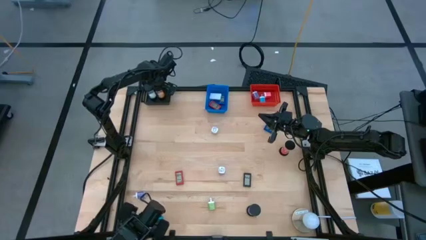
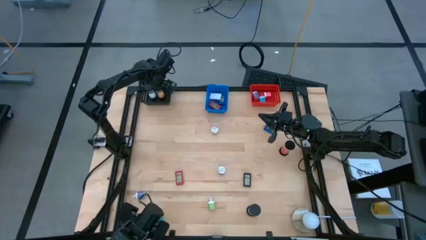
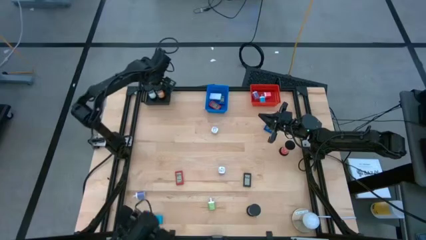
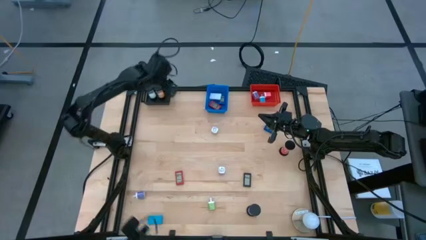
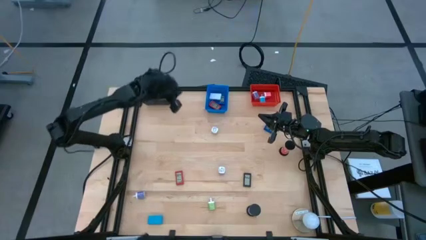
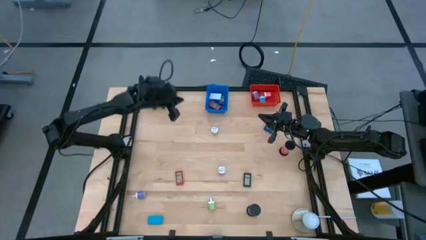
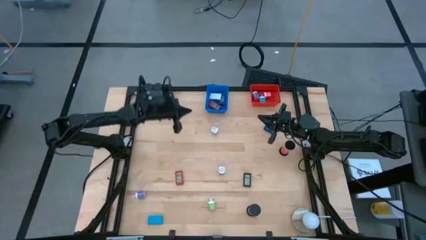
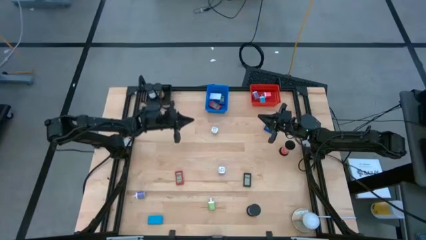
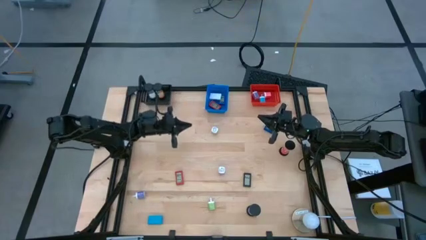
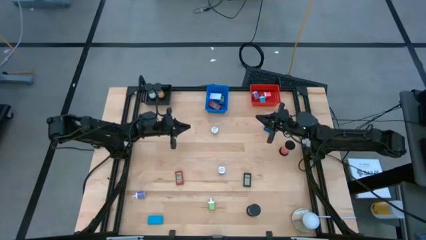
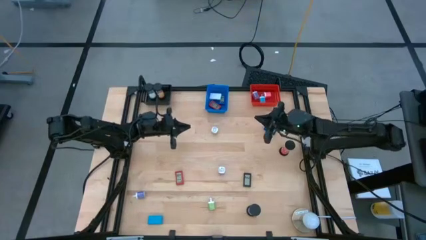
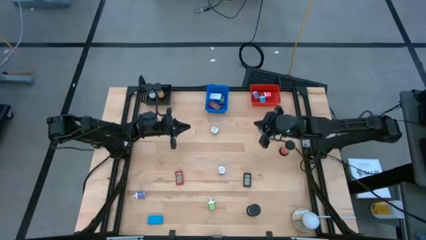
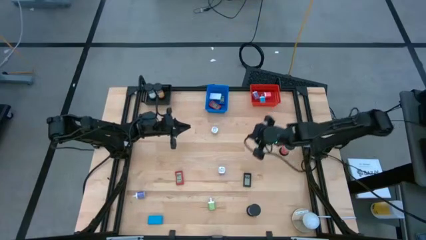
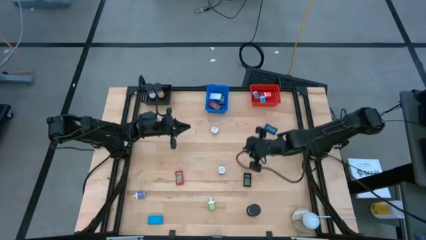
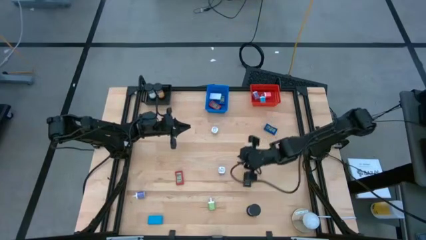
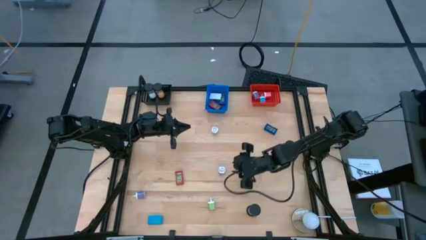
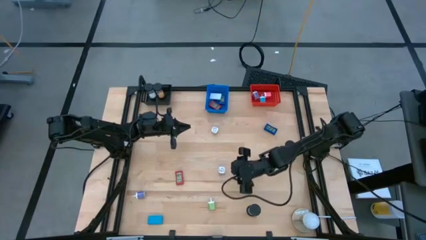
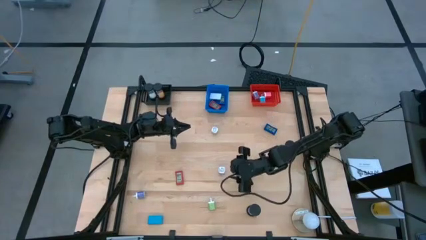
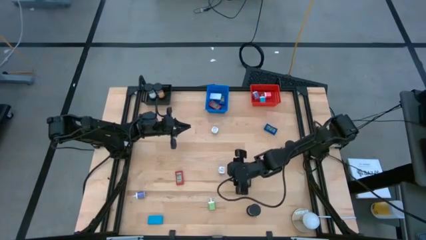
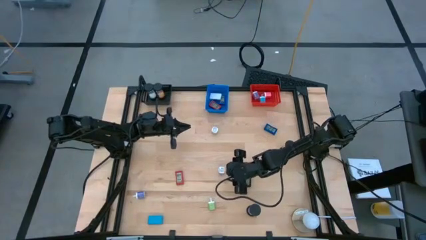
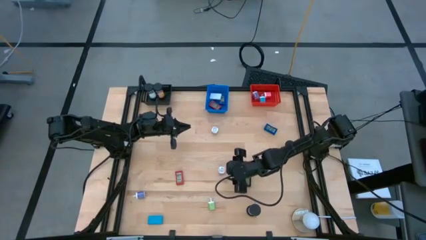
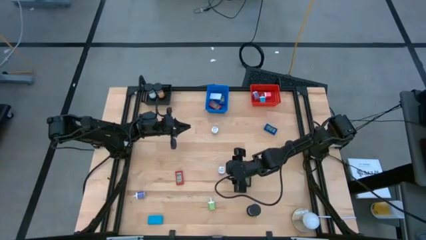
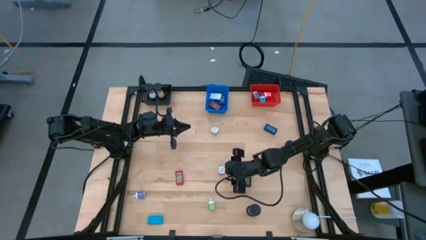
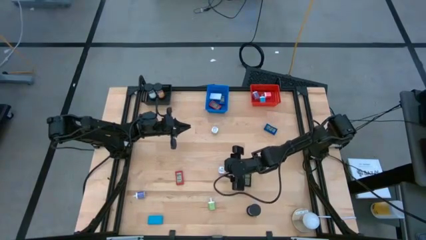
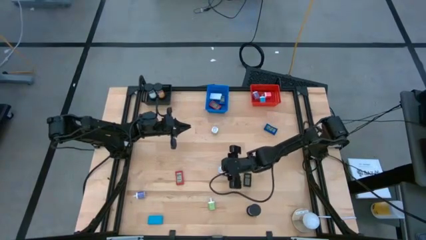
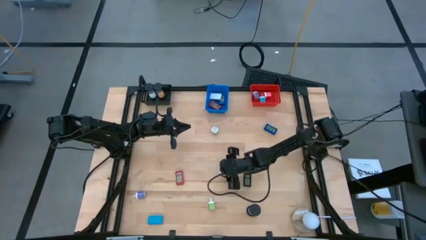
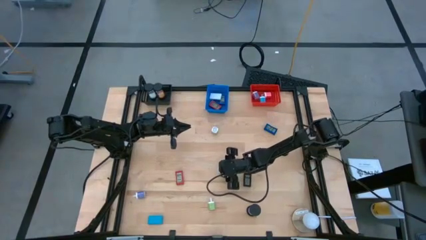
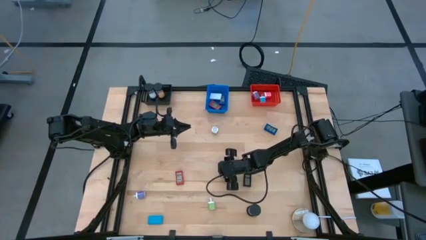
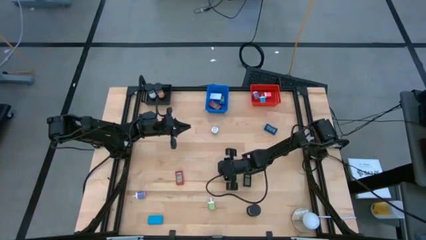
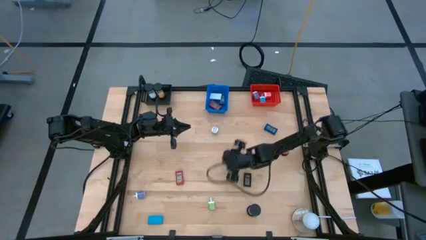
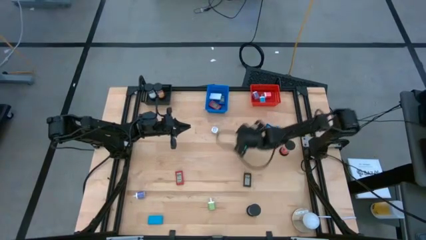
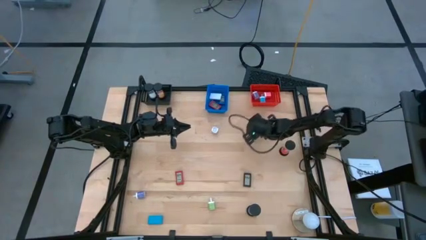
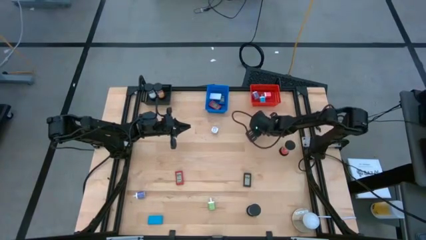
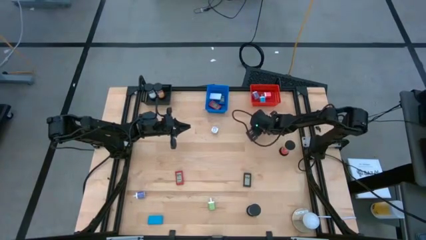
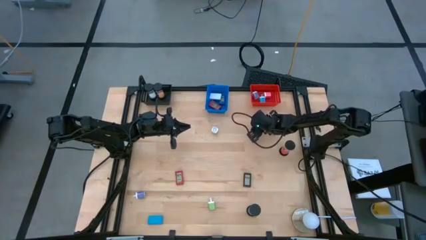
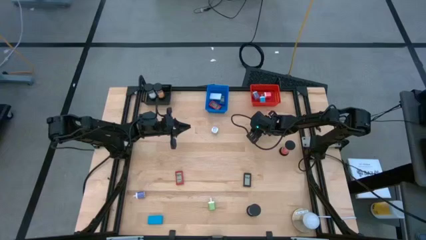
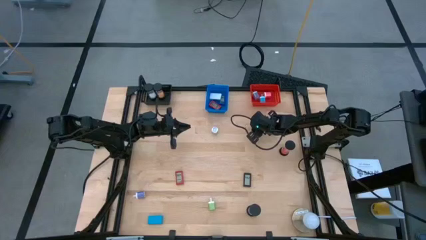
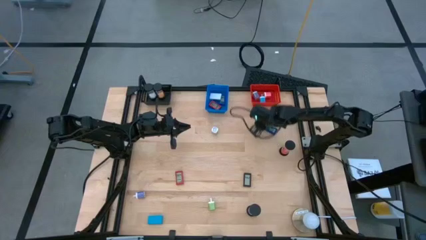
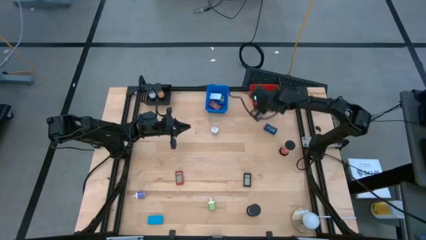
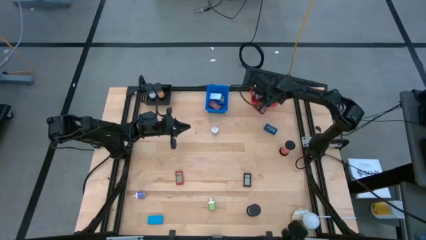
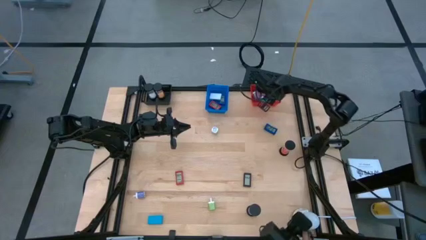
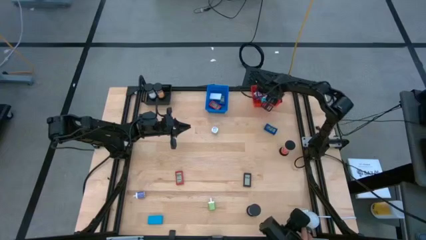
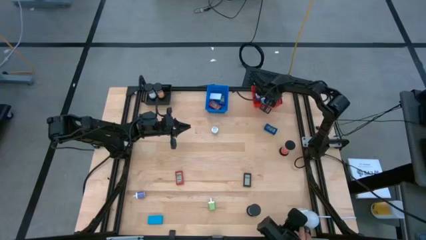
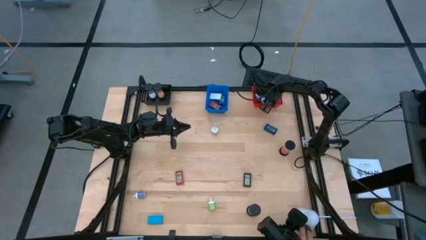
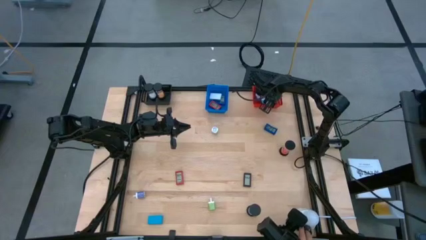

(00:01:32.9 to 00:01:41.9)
Task: Pick & Place Office items
Put the right purple charger adapter into the red basket

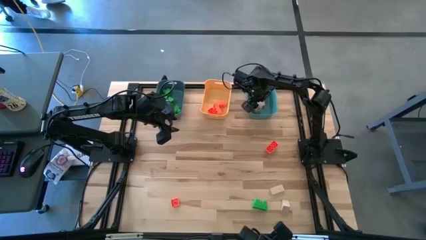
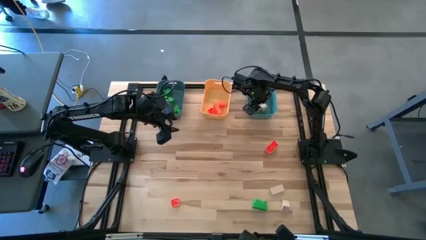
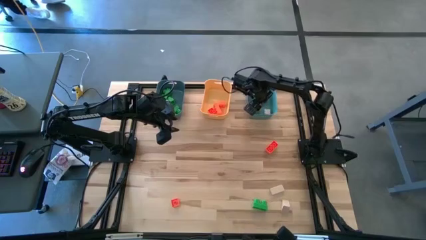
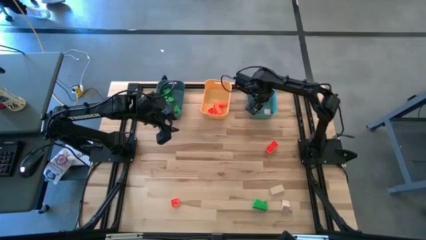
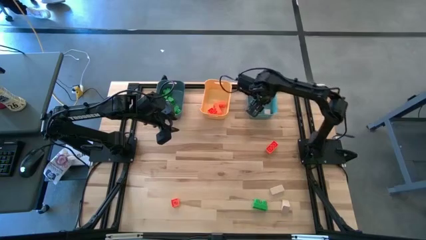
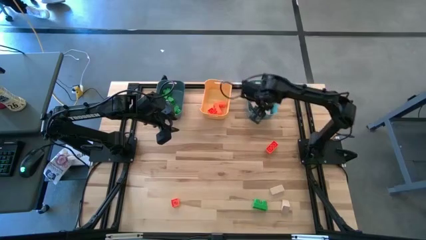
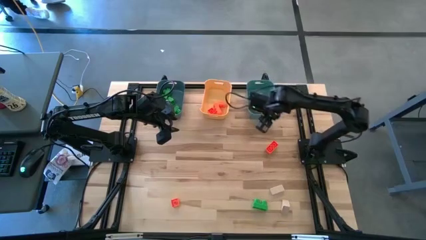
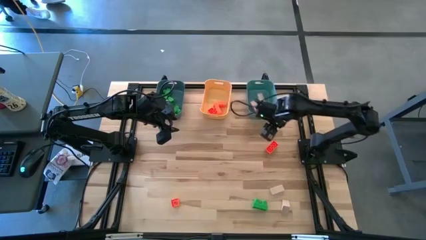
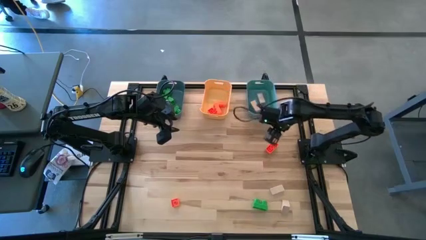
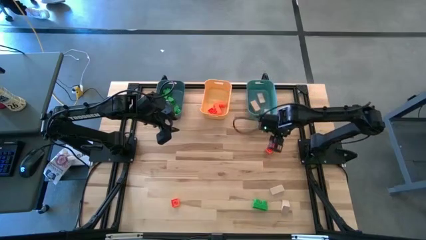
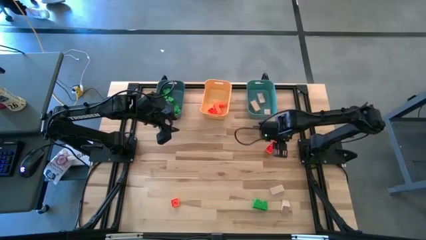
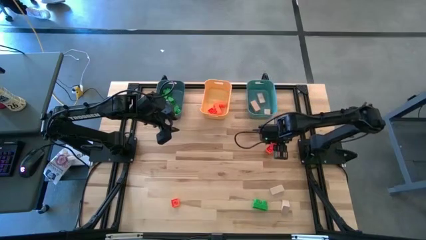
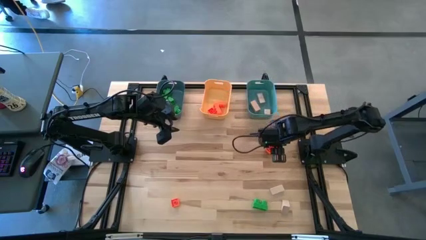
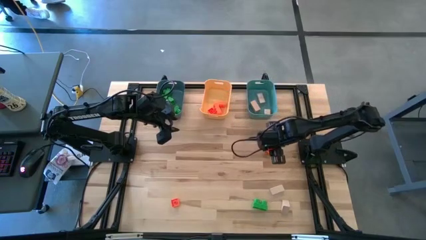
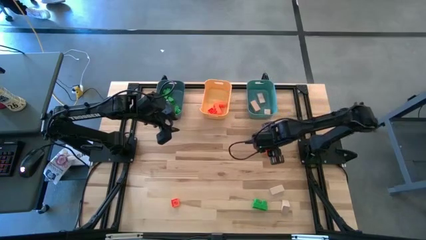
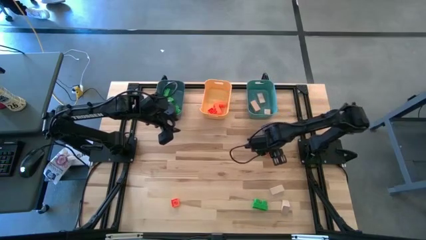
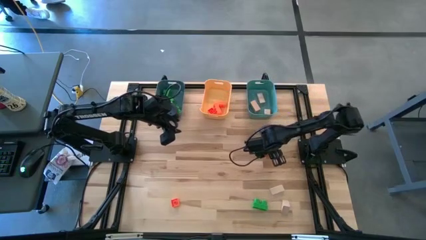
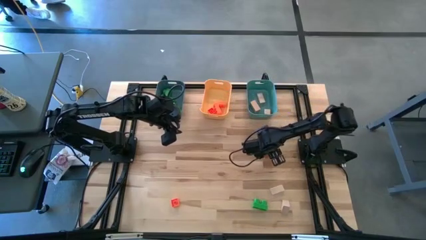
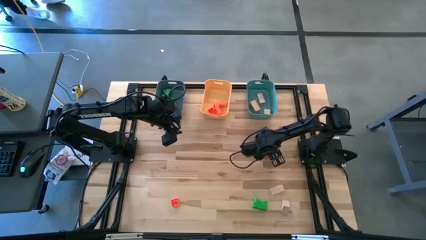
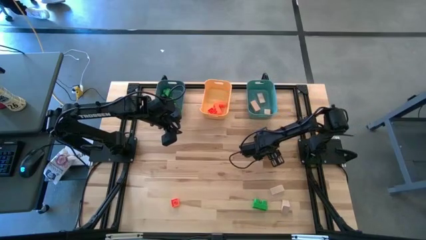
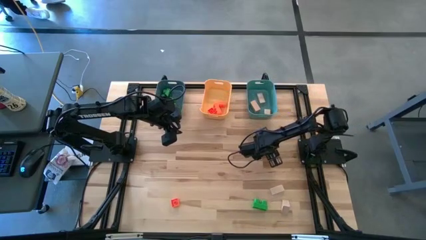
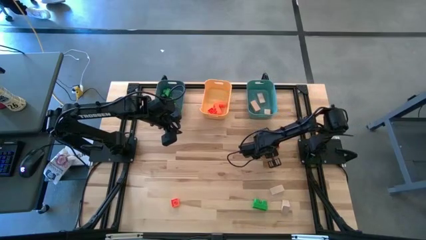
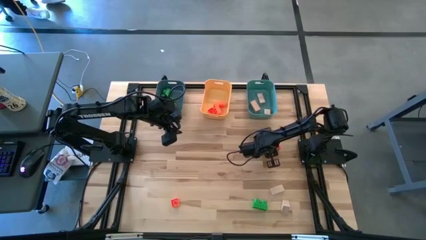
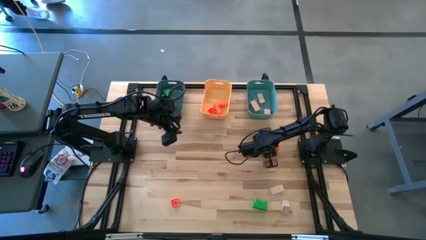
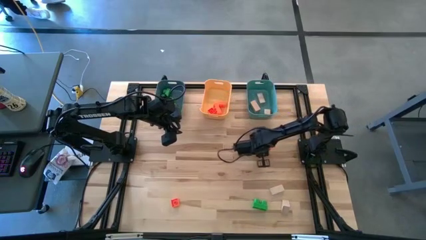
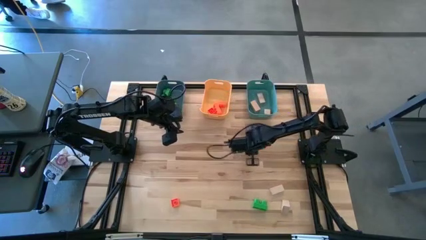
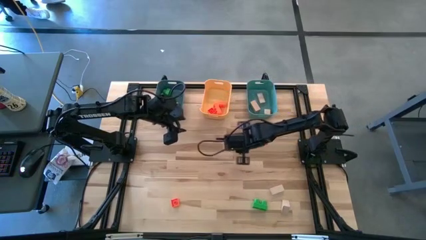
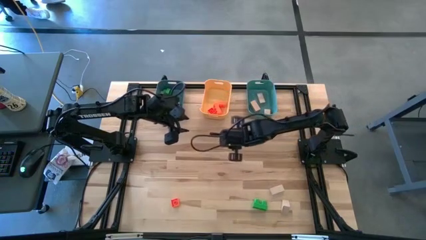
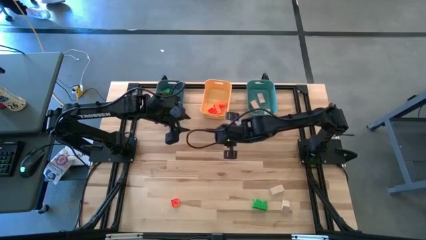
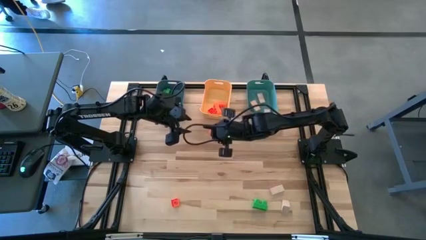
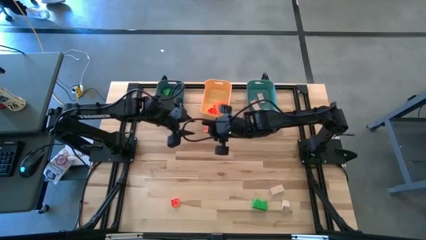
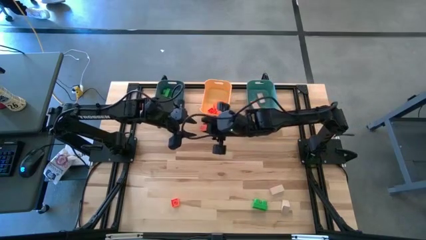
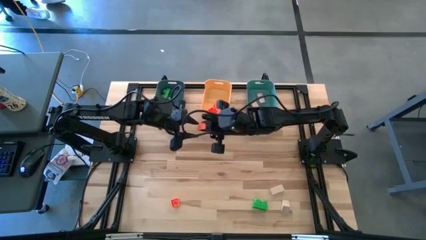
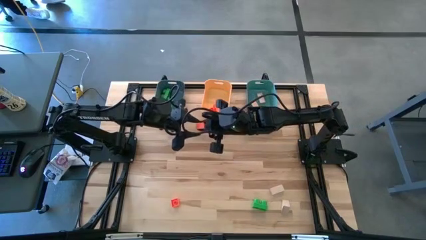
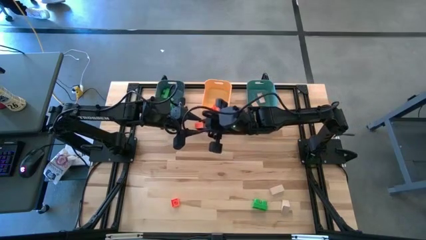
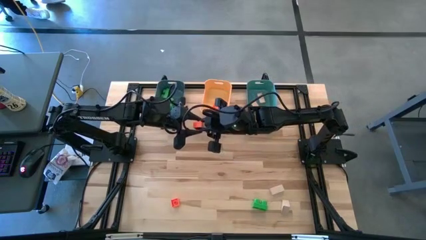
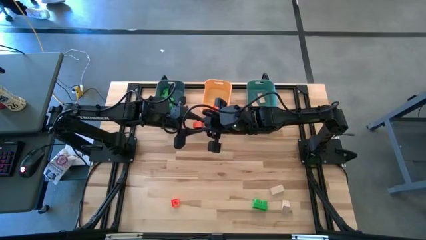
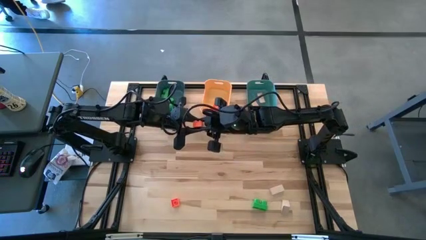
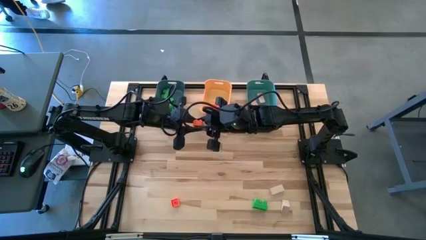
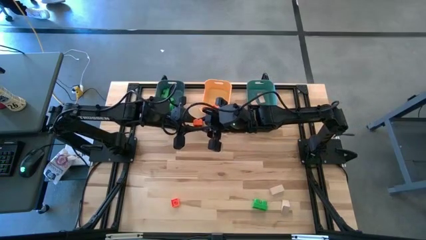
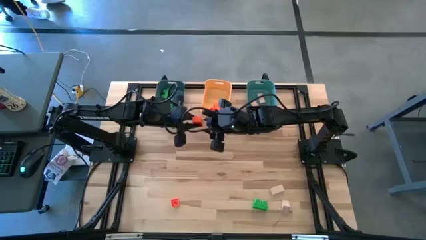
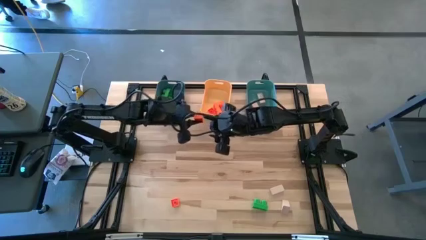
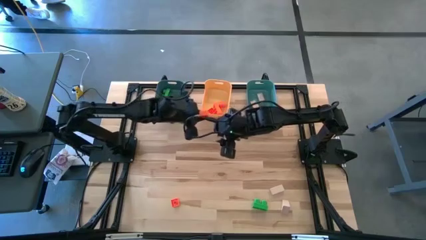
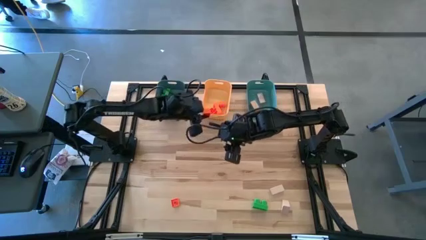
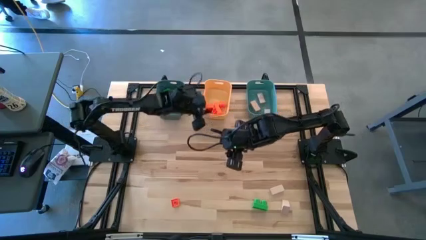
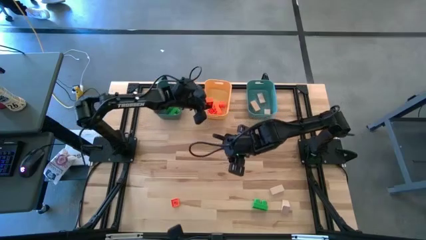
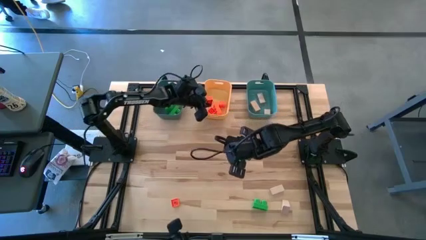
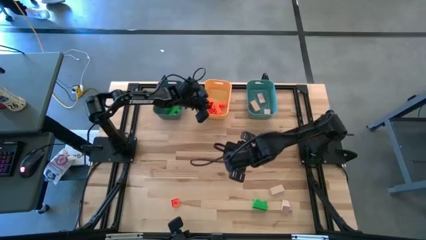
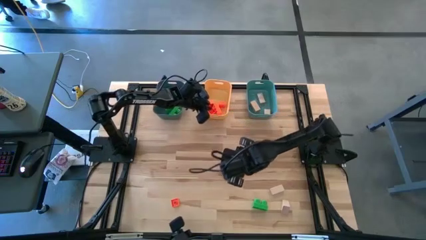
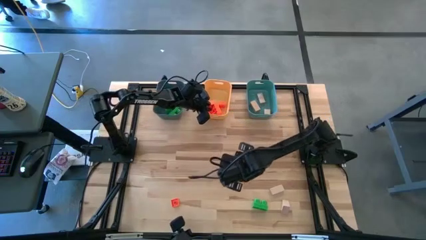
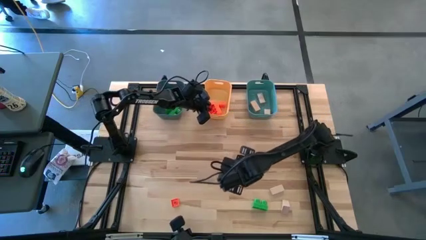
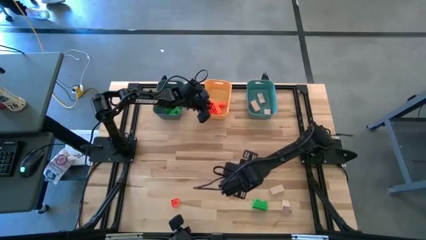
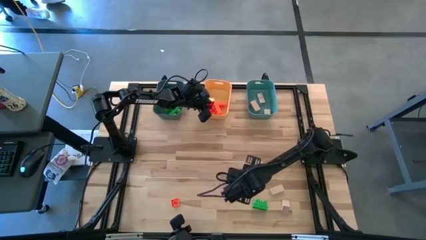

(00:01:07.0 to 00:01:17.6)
Task: Sort & place blocks by color
Put the orange game piece into the yellow bin
